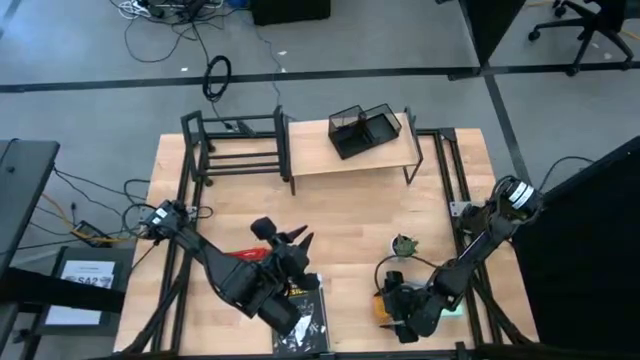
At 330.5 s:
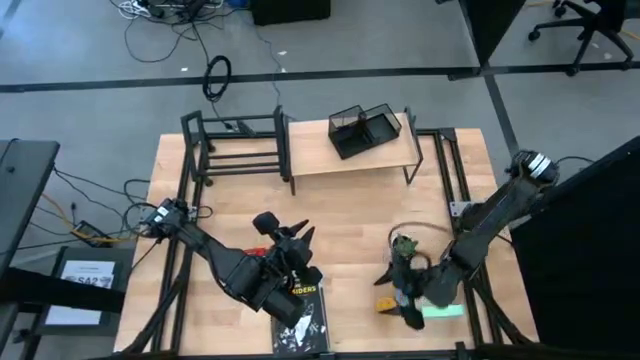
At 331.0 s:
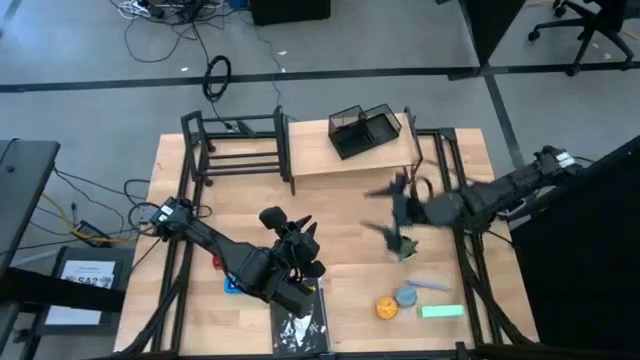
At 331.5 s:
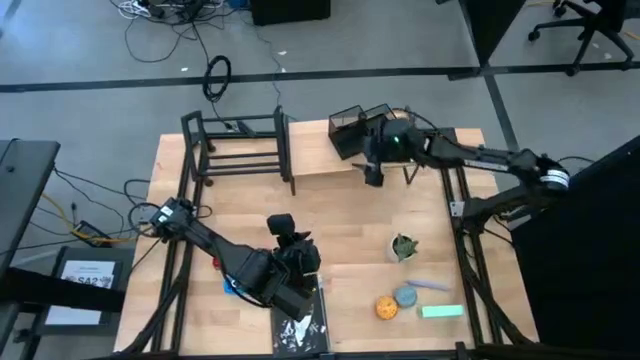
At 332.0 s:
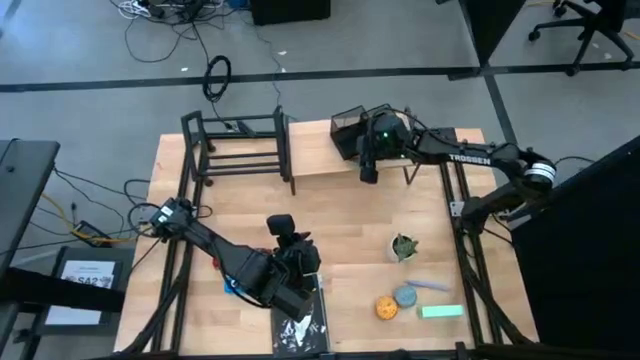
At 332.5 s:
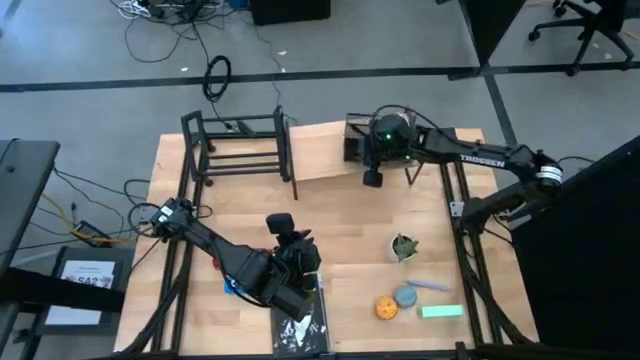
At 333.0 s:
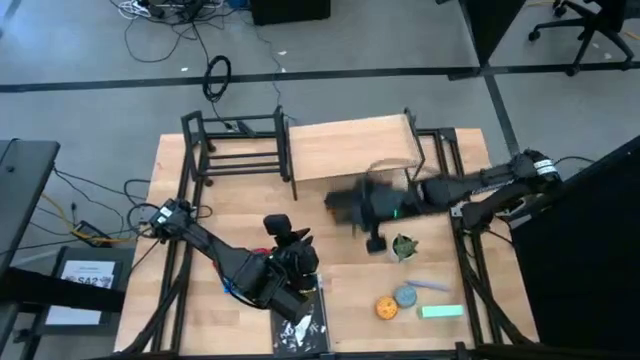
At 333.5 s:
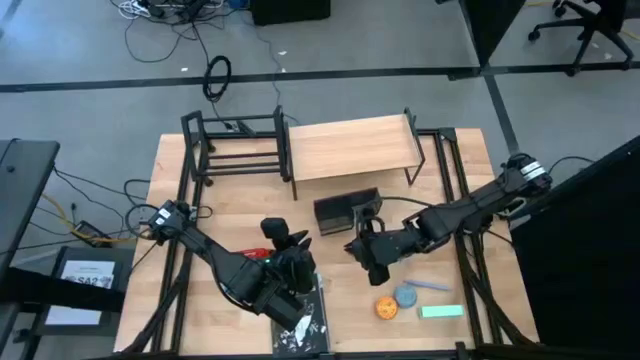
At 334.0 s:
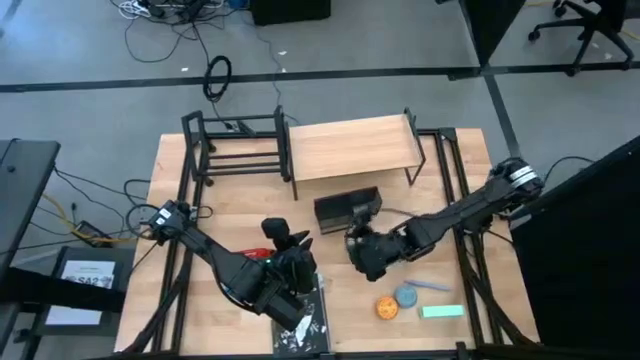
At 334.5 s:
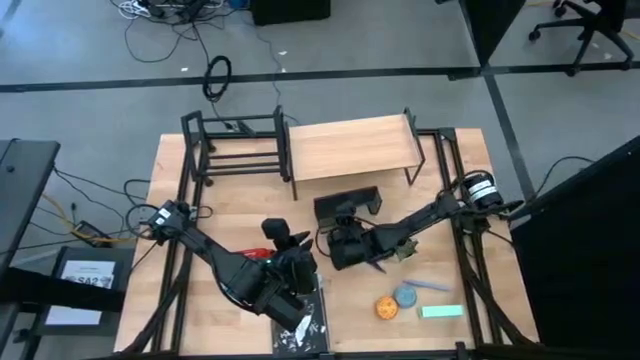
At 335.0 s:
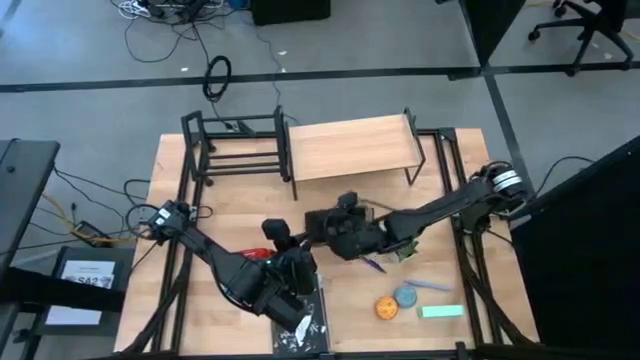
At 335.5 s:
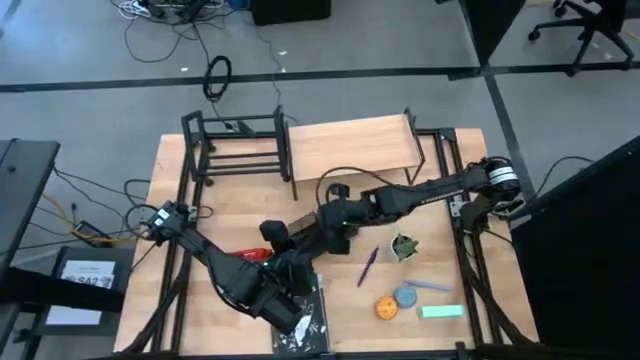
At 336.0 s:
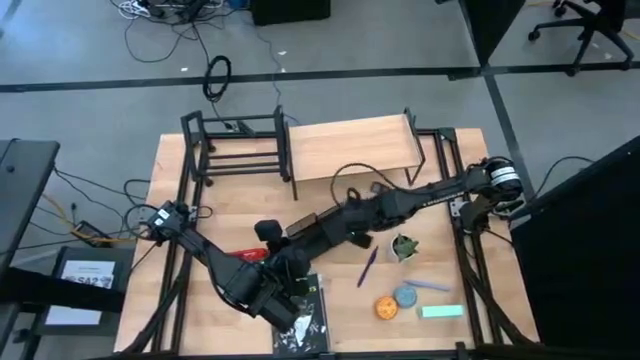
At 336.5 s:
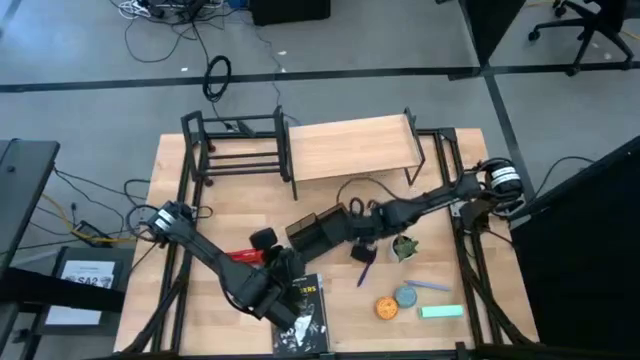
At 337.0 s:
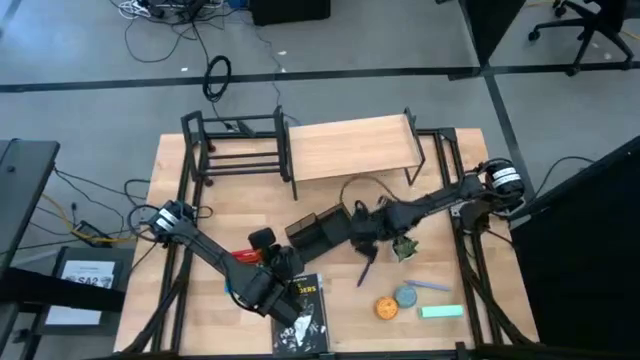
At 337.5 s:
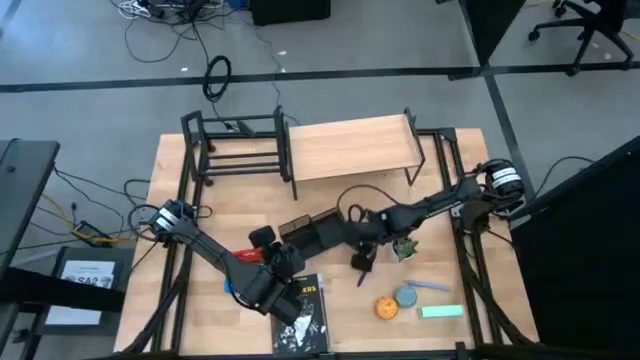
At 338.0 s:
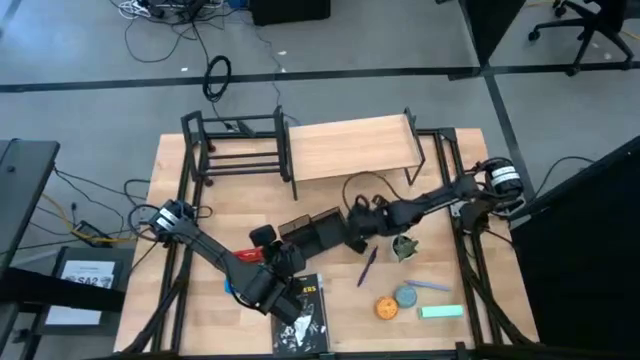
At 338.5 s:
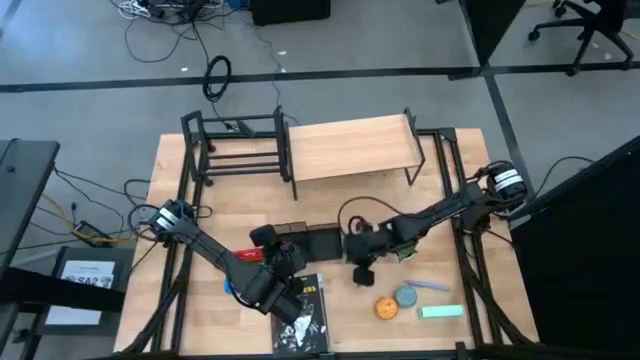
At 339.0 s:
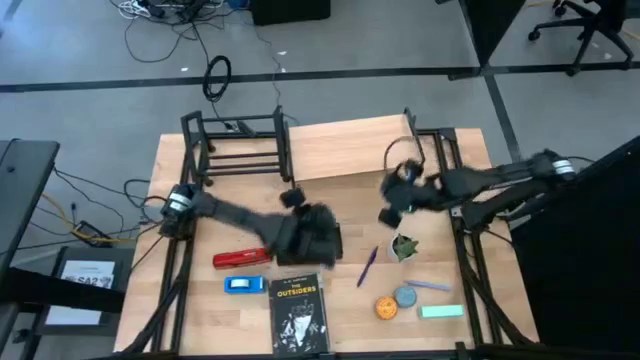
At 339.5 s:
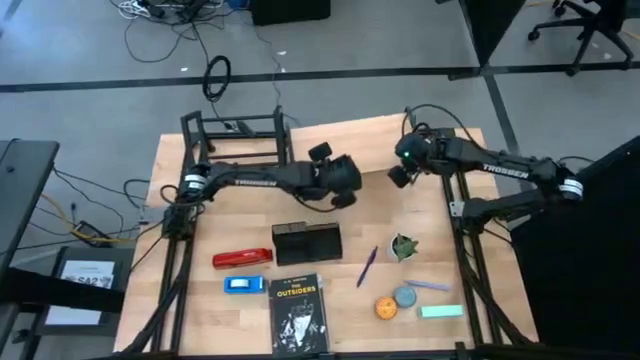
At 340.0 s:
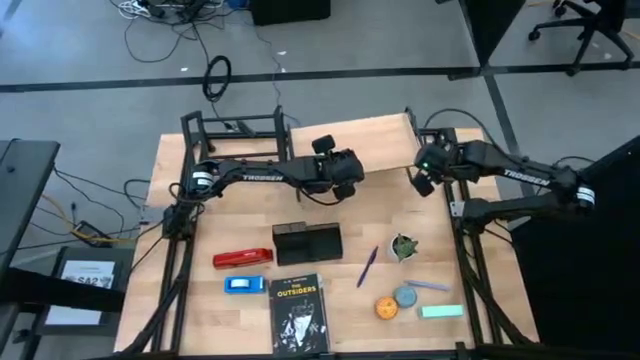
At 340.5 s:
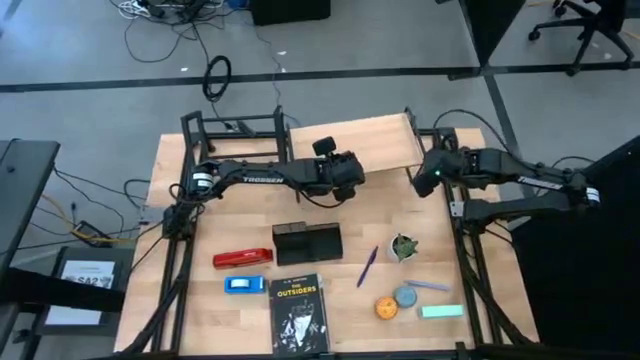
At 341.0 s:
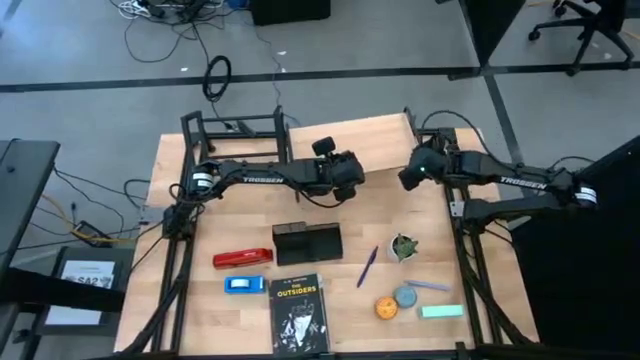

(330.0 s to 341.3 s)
Task: Stock shelves
Remove the pen holder from the shelf

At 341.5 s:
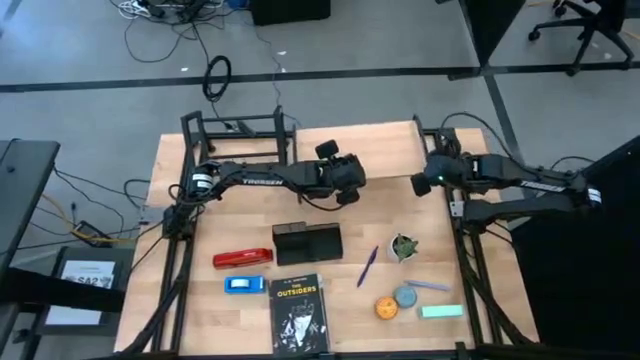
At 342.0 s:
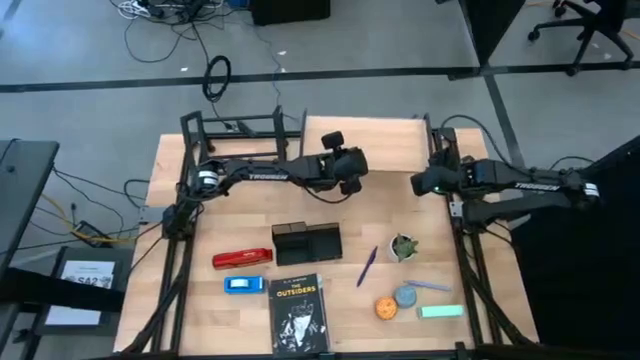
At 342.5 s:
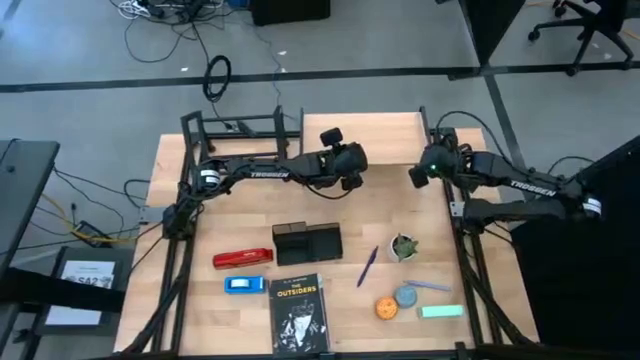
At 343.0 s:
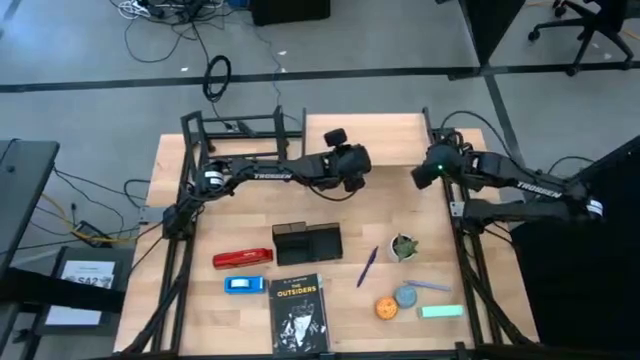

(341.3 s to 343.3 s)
Adjust the shelf

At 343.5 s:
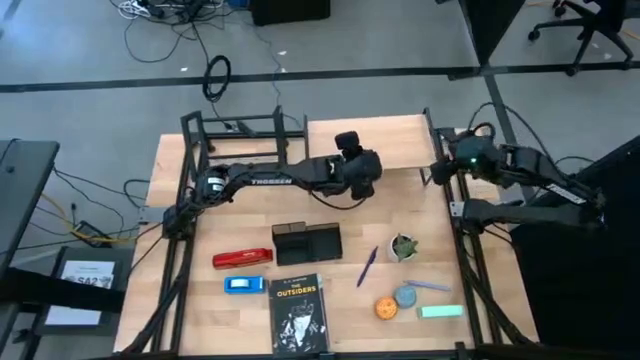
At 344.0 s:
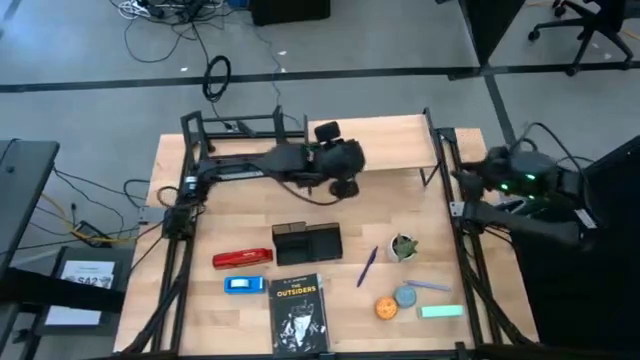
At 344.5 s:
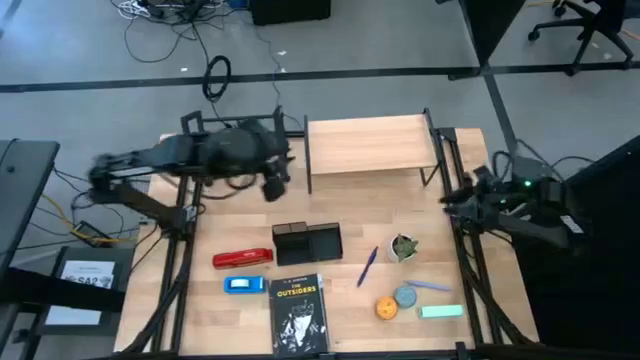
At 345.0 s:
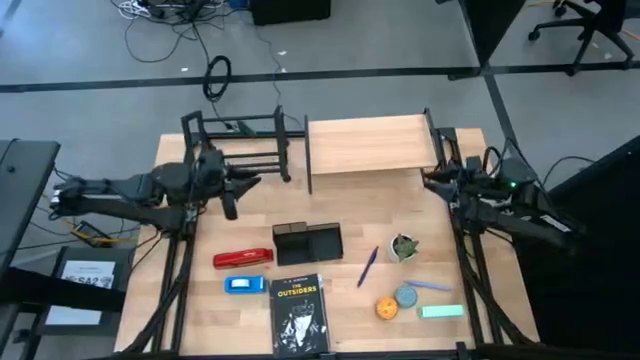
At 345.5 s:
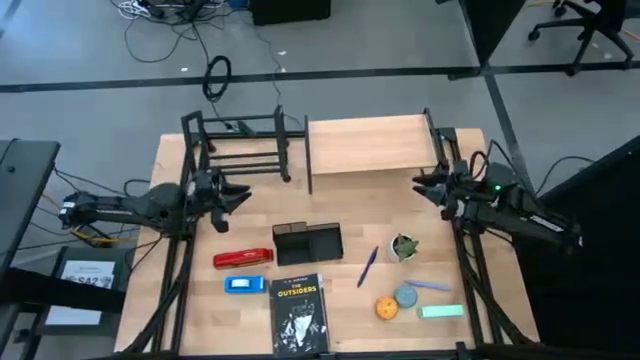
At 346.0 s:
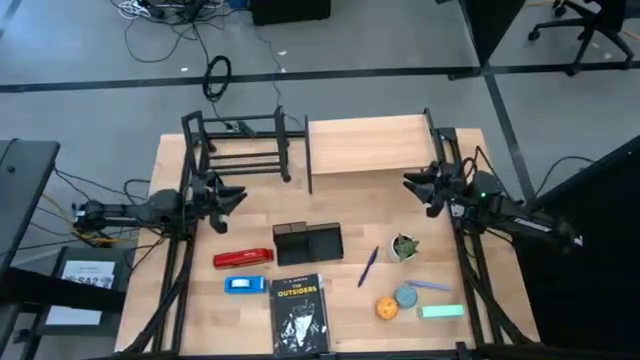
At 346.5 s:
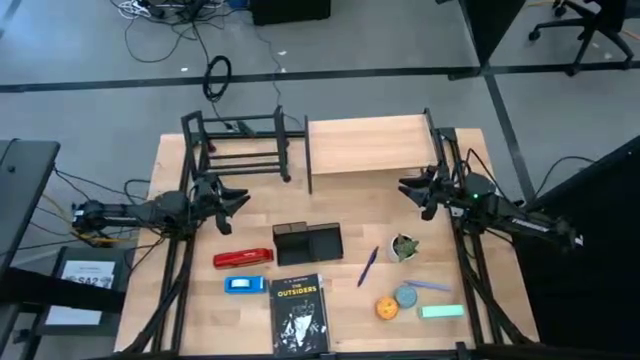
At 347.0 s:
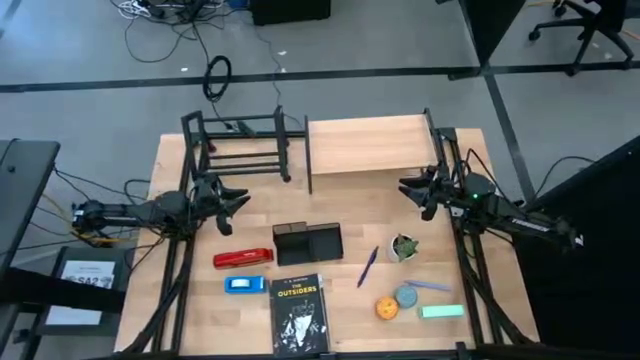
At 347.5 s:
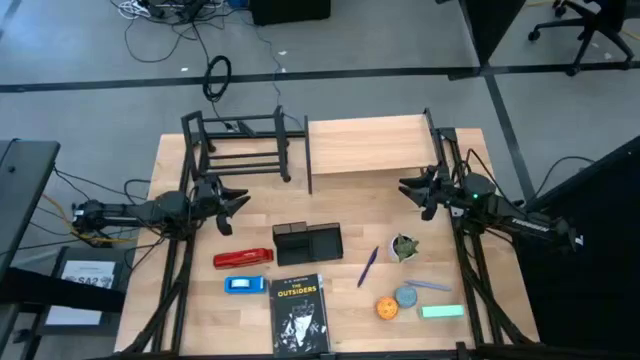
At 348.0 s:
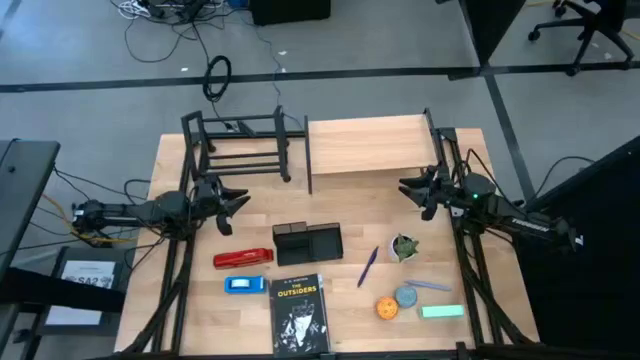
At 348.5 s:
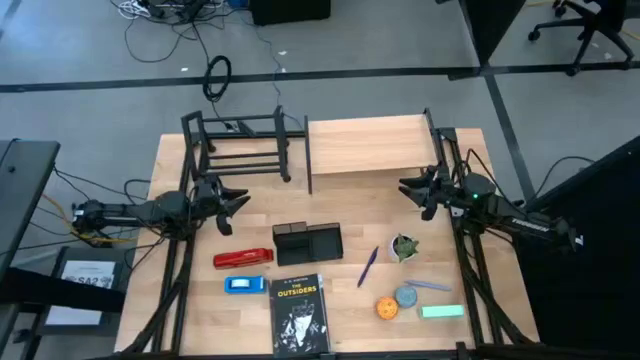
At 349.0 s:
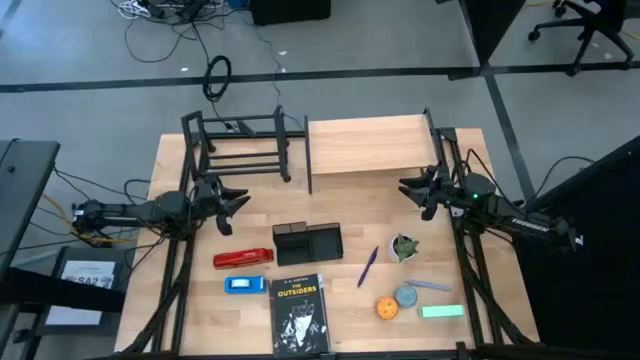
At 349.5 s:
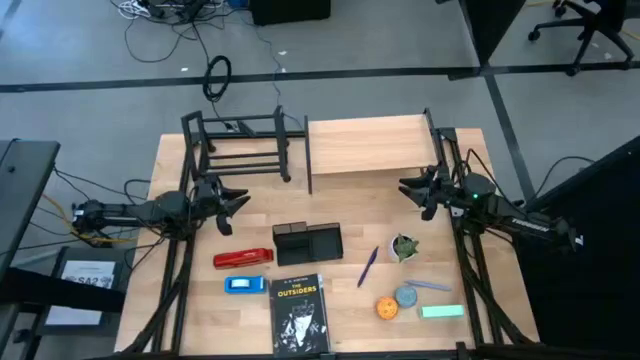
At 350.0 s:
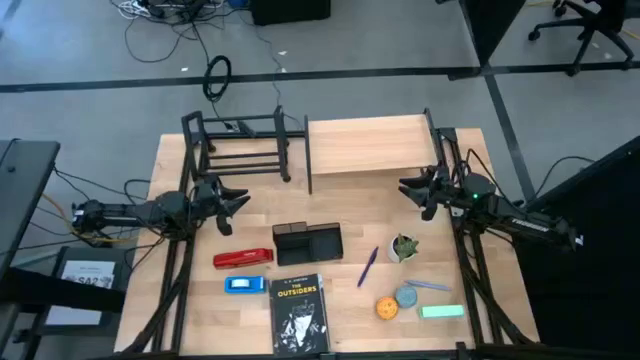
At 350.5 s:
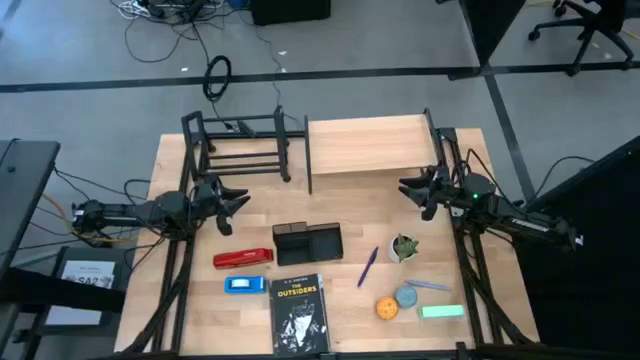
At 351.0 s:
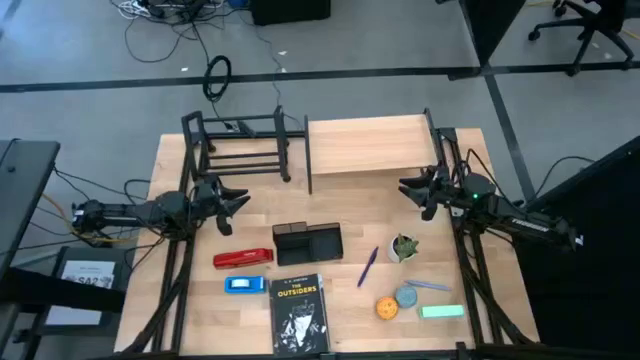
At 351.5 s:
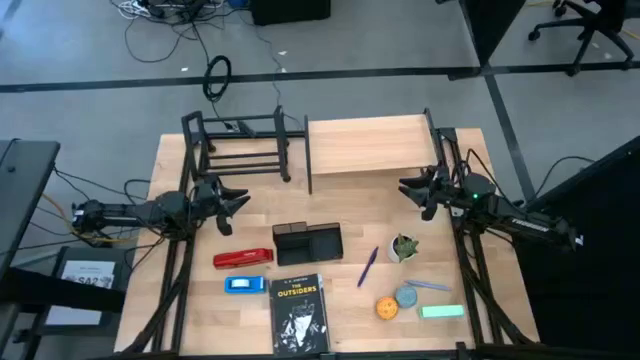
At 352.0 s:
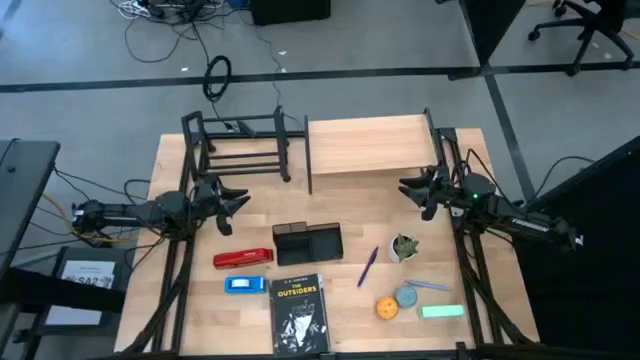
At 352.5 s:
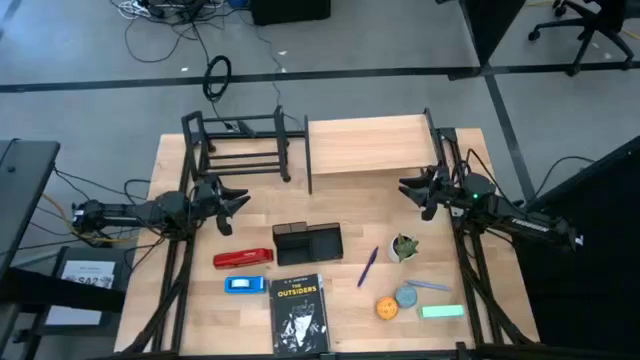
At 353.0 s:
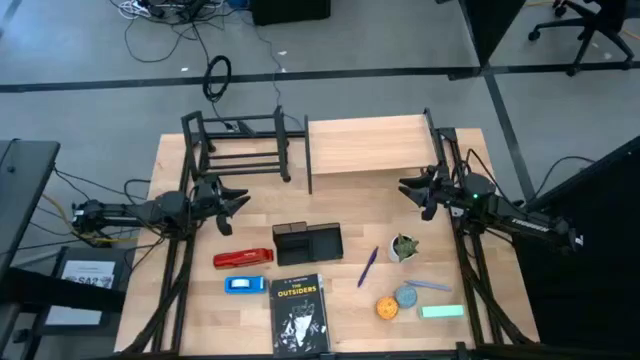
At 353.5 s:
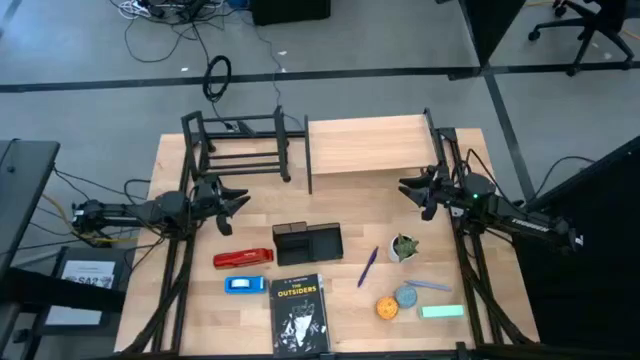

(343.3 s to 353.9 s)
Return to Home Position
